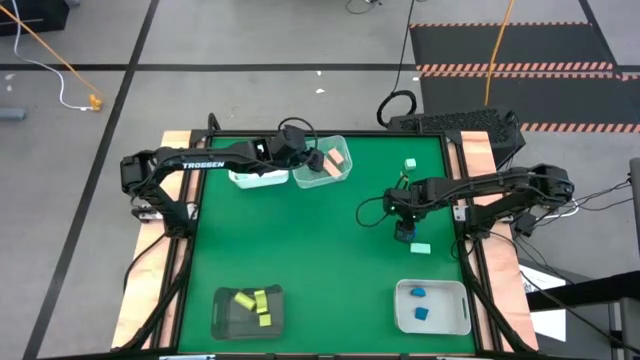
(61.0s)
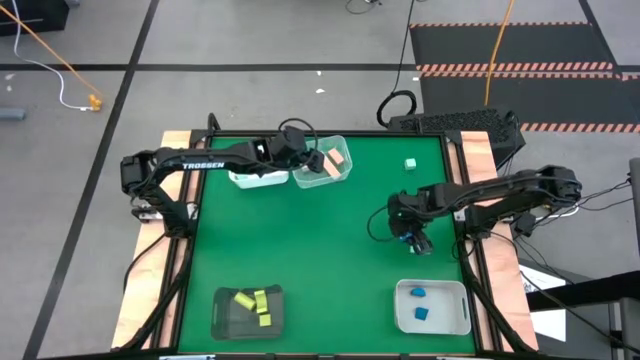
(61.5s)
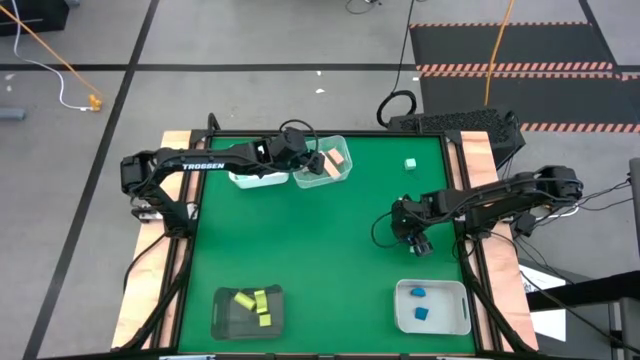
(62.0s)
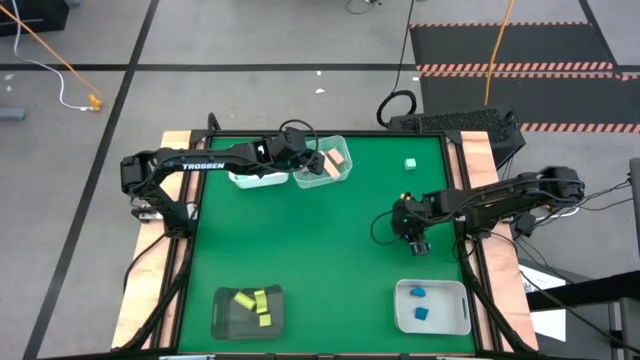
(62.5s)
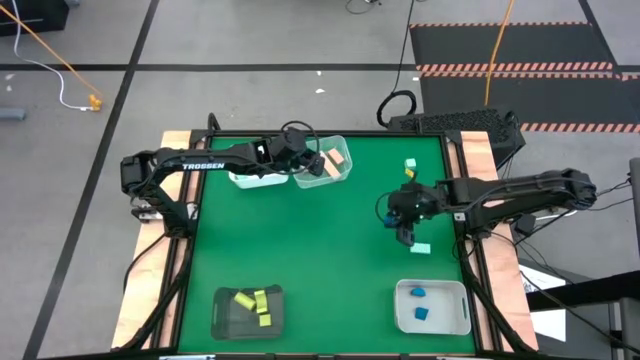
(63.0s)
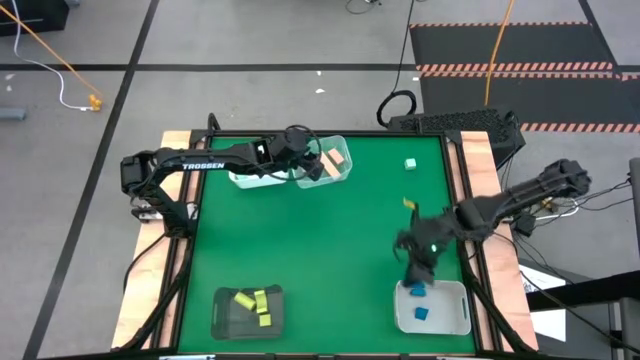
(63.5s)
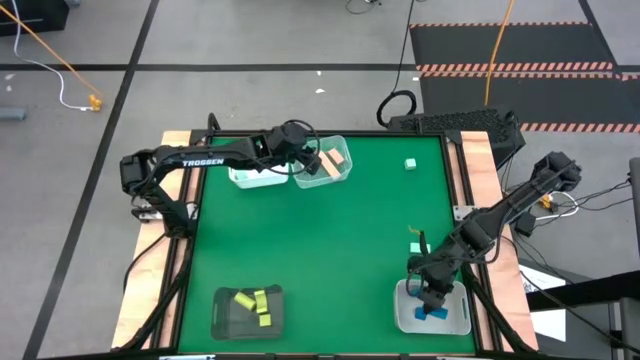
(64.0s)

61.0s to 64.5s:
Task: Sort & place blocks by color
Put the blue block into the gray bin

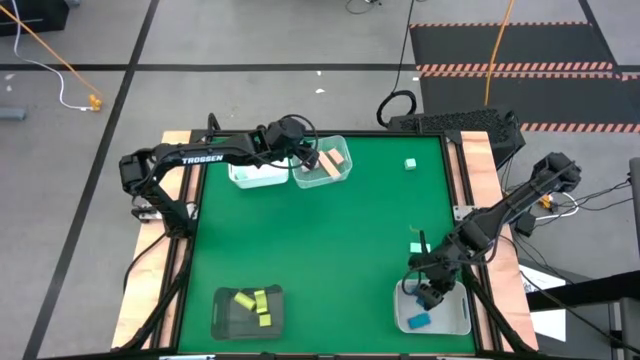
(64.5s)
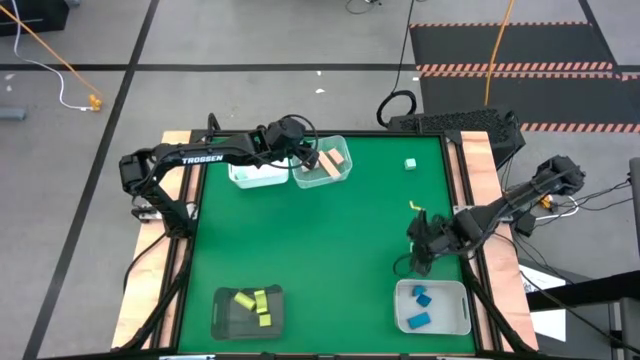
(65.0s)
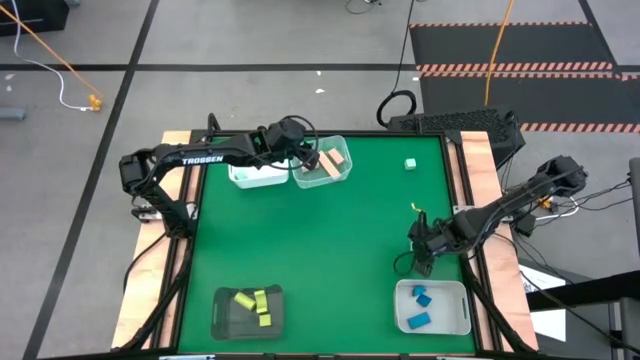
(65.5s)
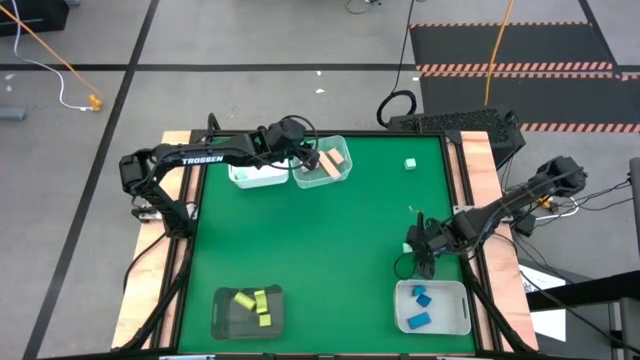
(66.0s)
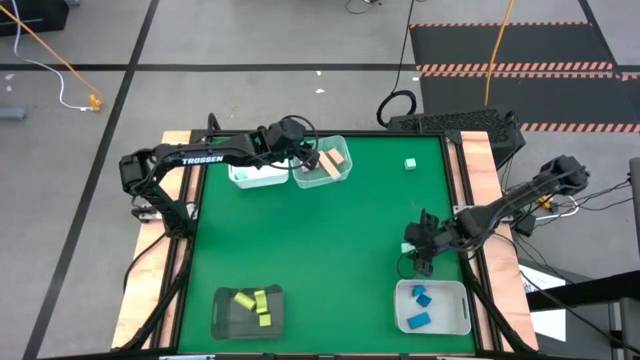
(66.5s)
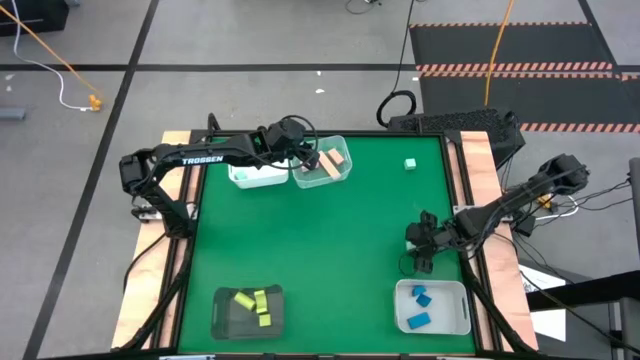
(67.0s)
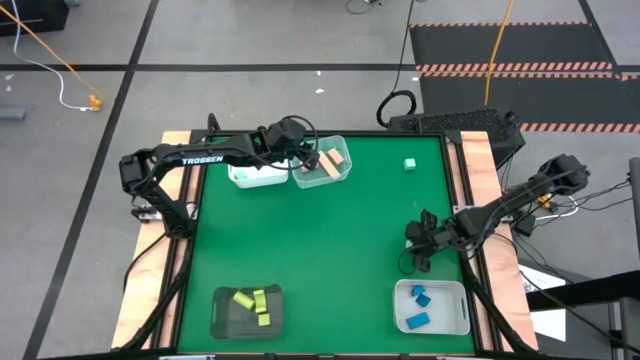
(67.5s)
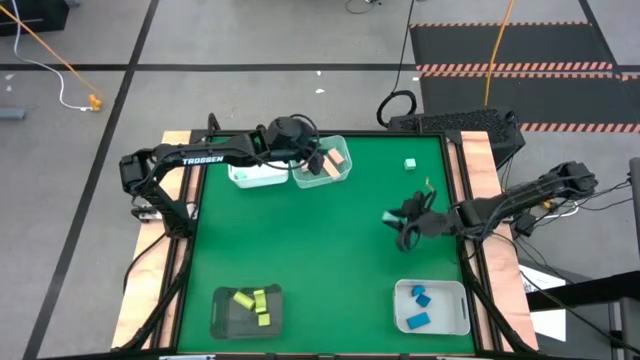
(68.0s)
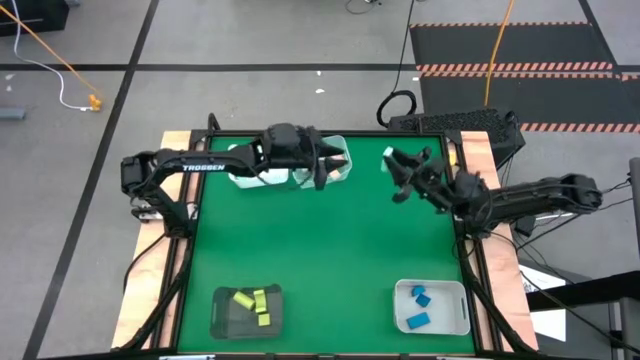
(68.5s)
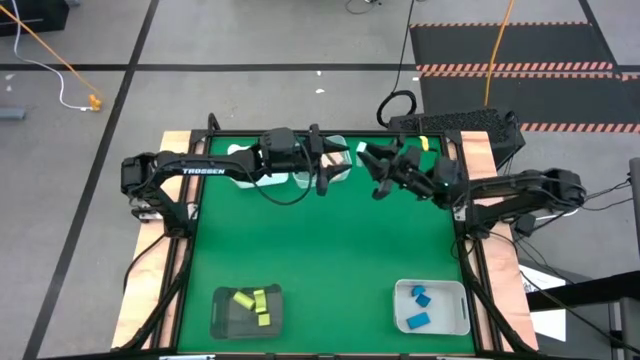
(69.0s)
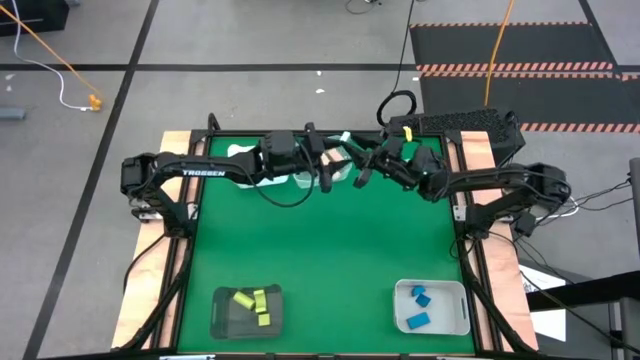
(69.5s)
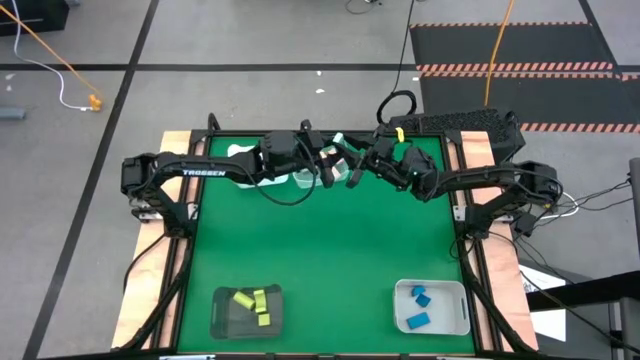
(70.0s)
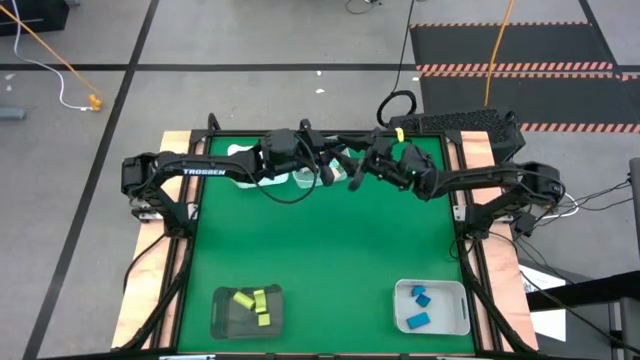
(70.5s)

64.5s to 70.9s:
Put the bottom white block into the white bin

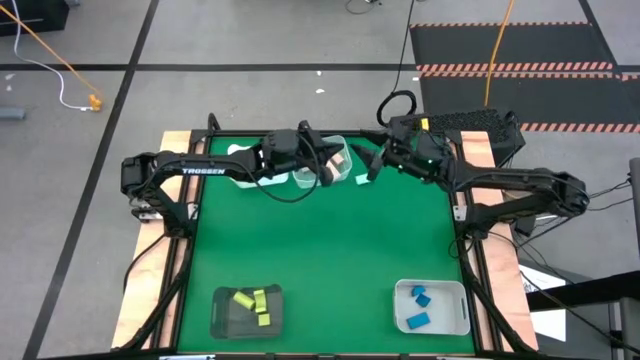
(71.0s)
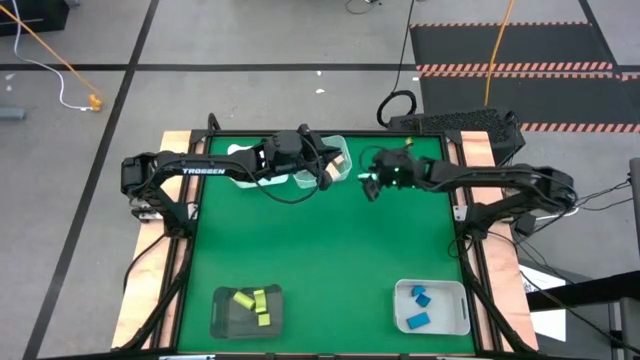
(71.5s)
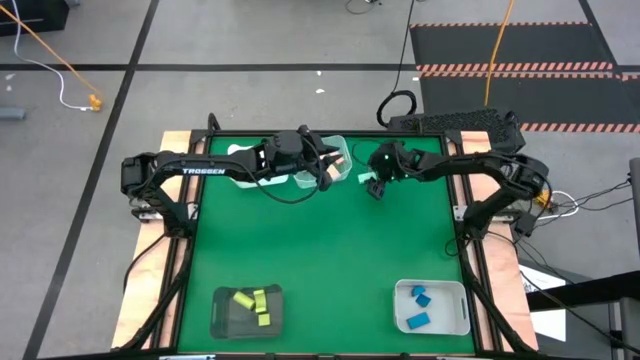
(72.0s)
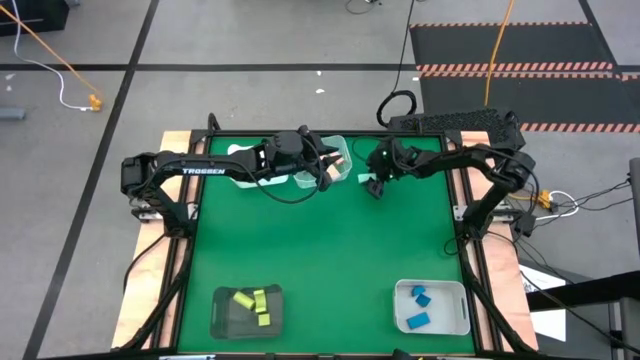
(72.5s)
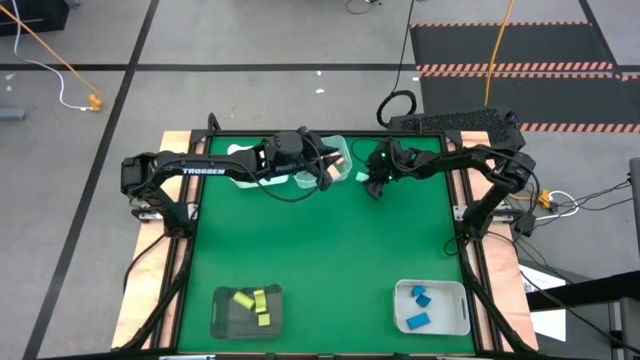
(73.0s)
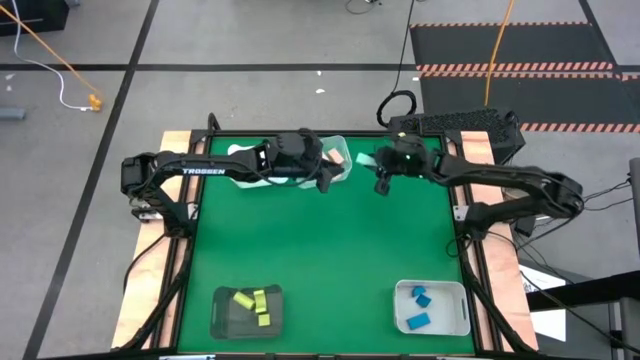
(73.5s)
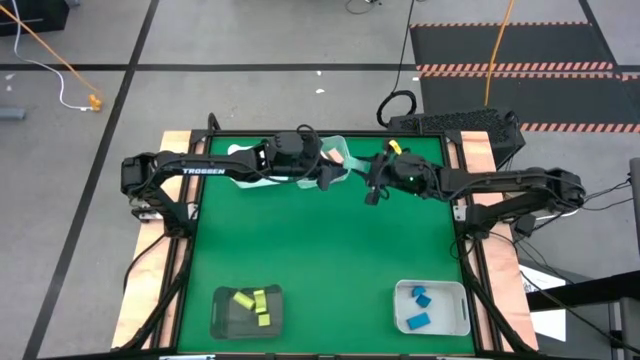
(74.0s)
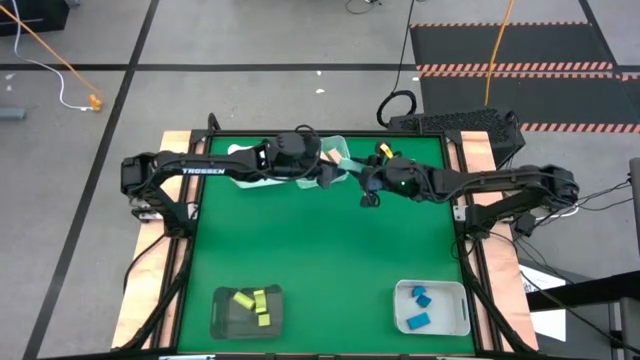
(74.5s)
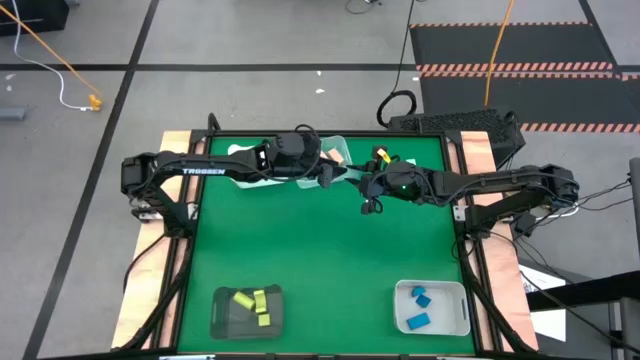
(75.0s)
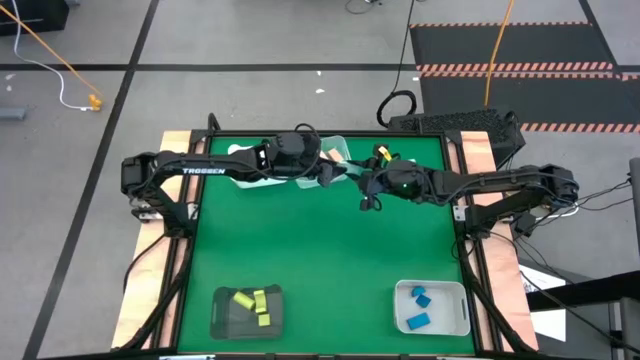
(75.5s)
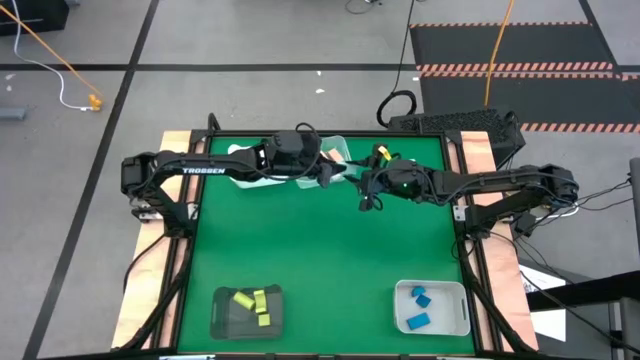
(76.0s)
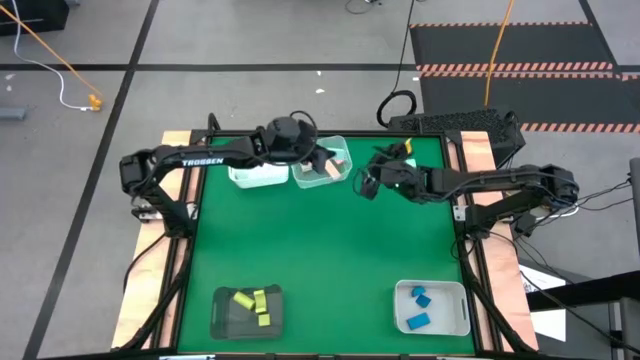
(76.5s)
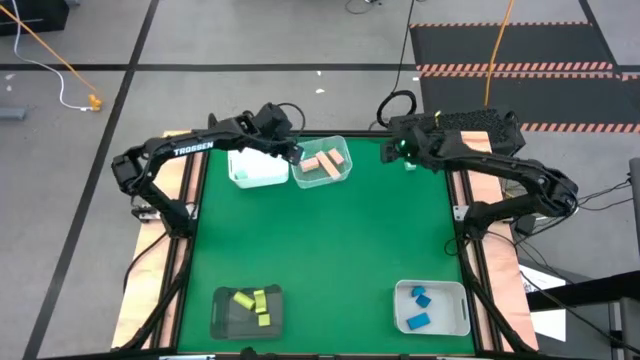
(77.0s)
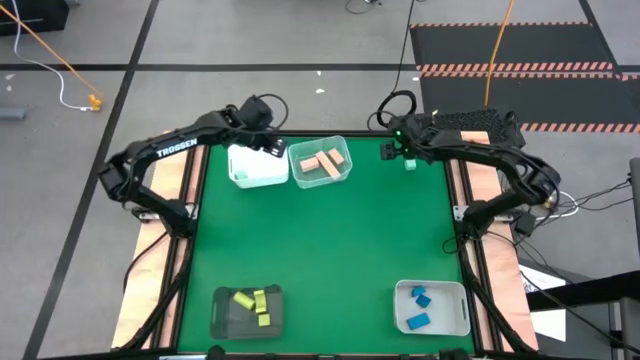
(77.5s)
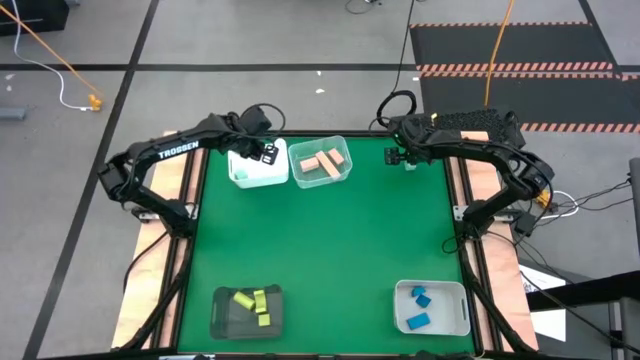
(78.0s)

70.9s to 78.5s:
Put the bottom white block into the white bin

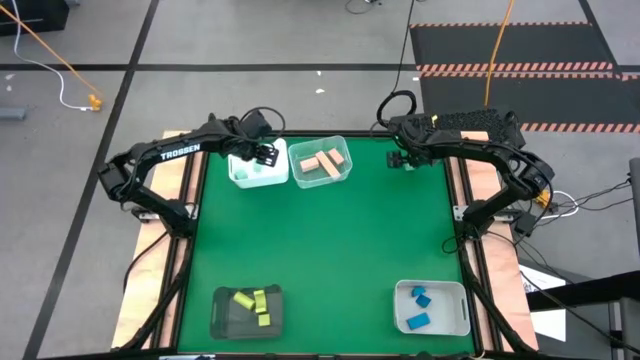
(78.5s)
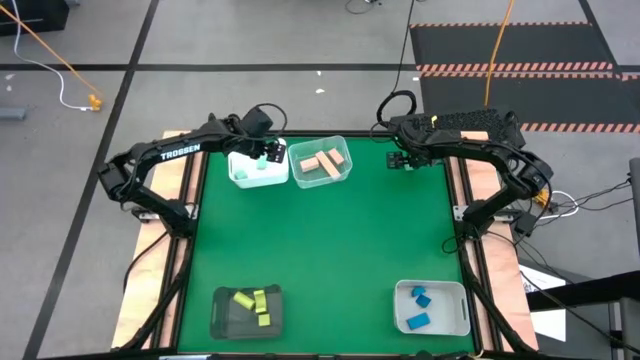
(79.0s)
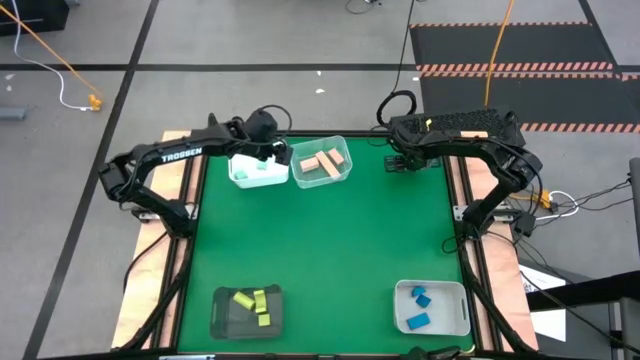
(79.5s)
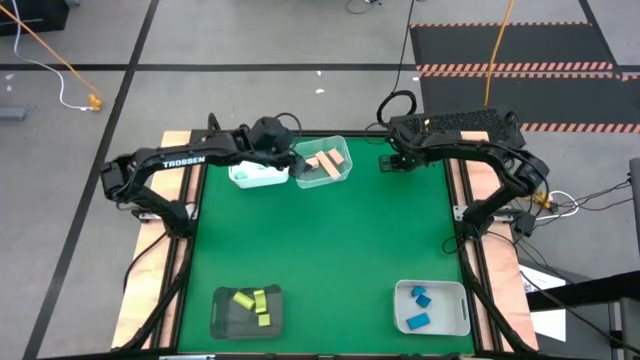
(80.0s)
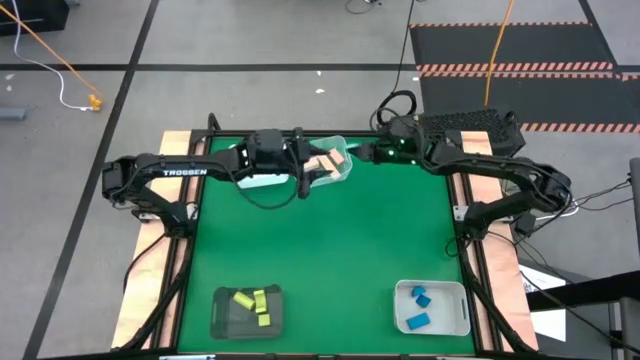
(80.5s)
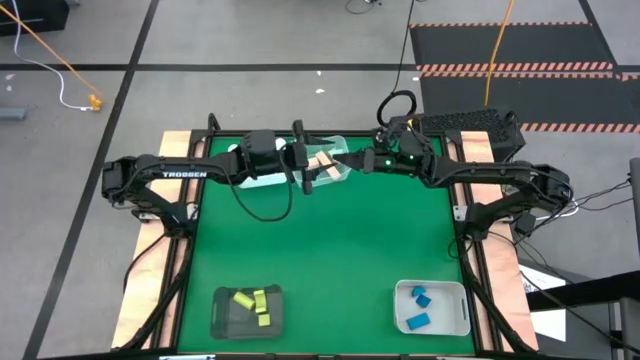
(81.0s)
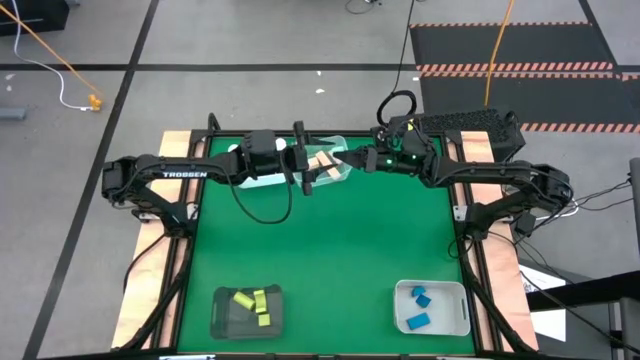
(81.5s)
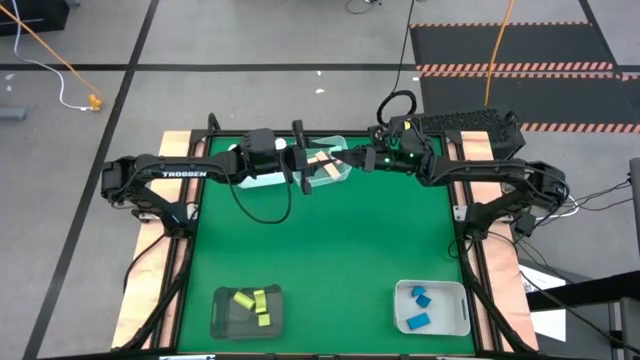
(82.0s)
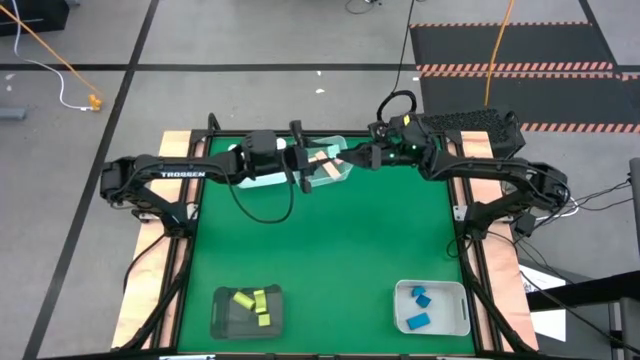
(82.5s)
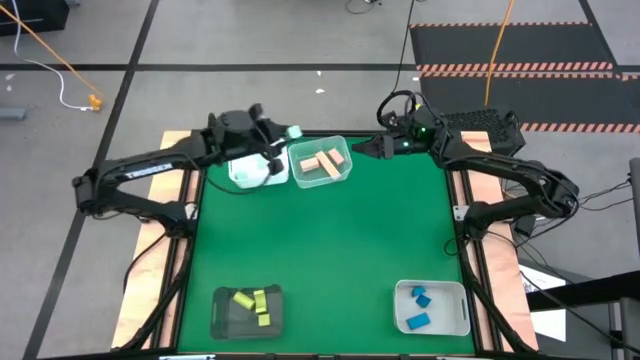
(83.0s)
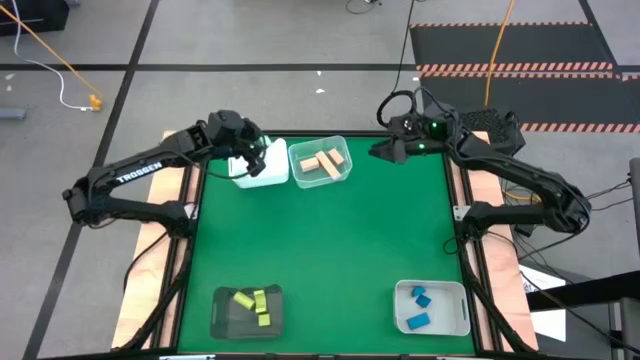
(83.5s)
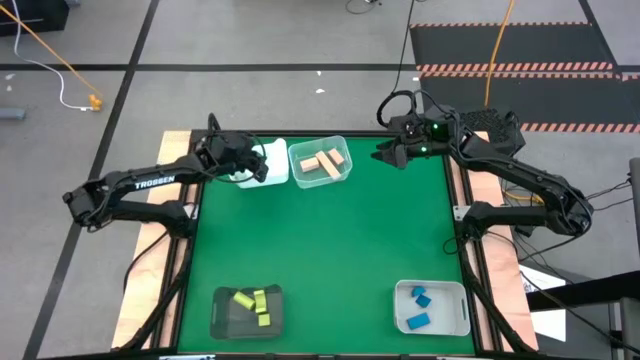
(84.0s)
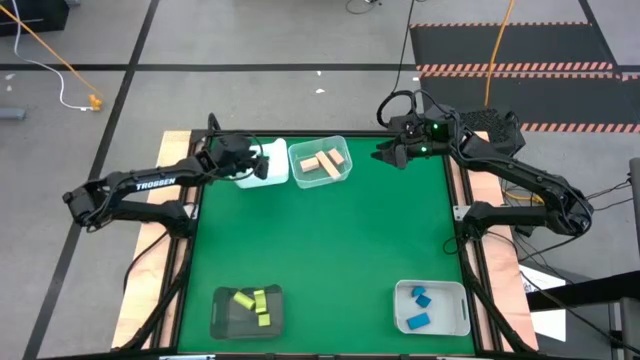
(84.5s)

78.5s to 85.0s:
Put the white block into the white bin
